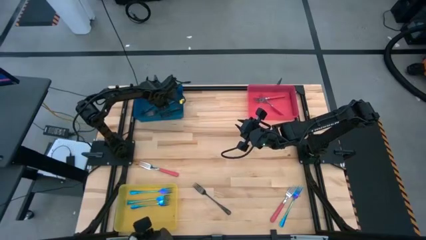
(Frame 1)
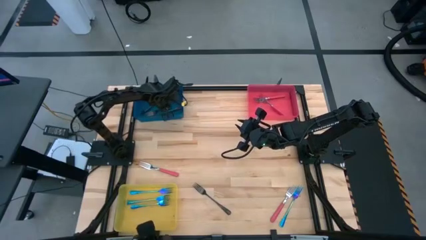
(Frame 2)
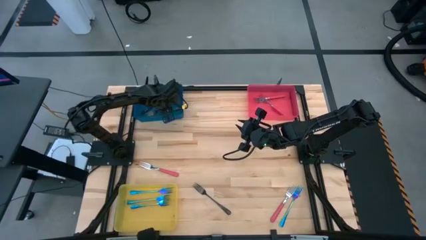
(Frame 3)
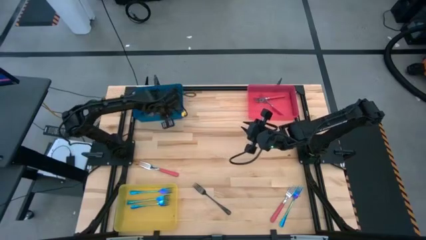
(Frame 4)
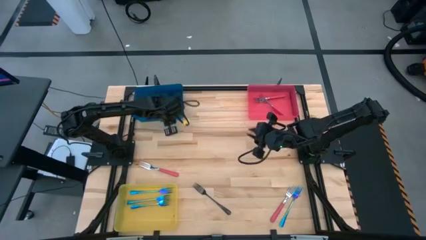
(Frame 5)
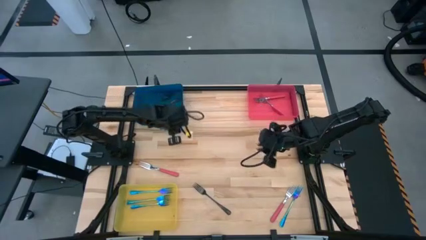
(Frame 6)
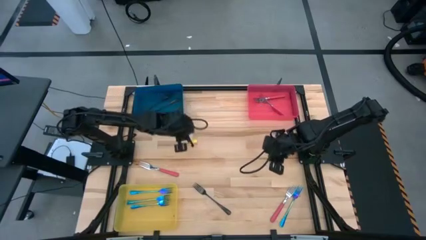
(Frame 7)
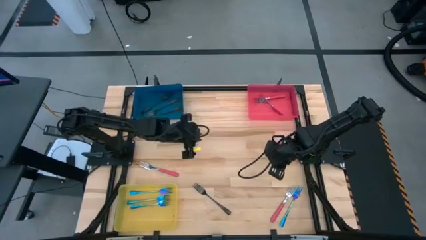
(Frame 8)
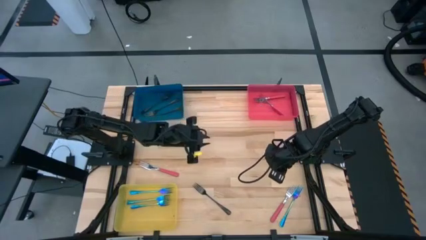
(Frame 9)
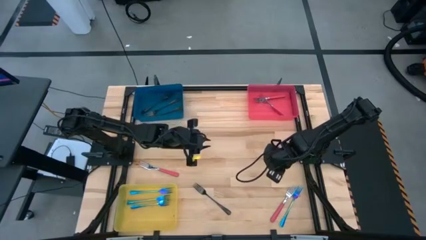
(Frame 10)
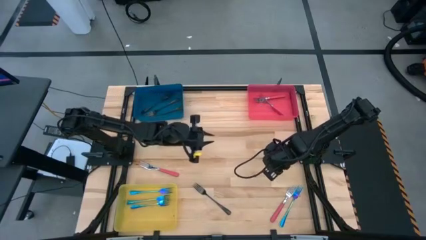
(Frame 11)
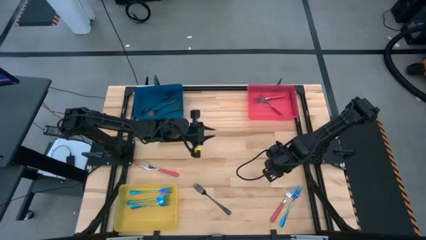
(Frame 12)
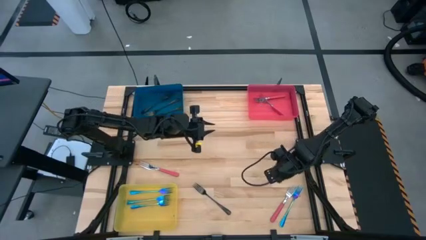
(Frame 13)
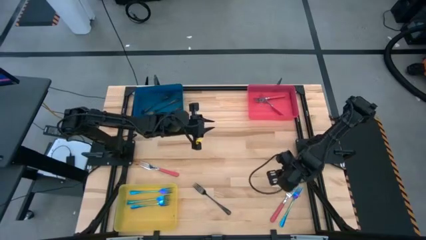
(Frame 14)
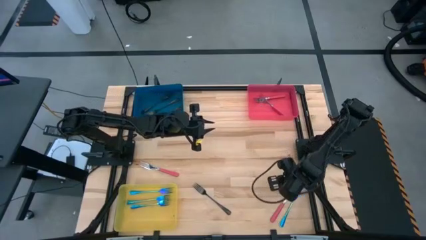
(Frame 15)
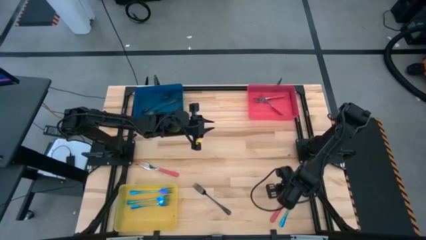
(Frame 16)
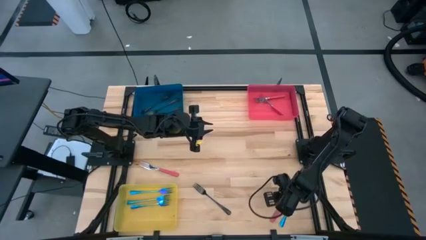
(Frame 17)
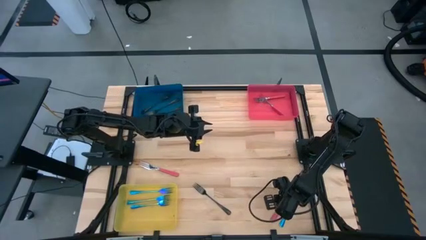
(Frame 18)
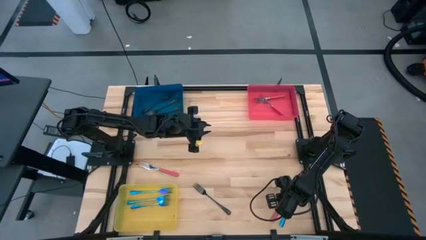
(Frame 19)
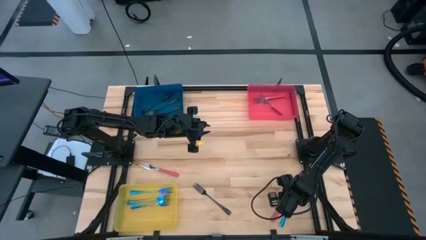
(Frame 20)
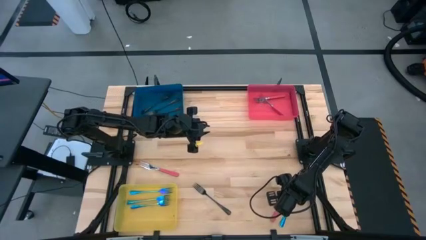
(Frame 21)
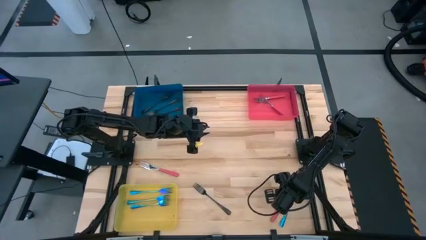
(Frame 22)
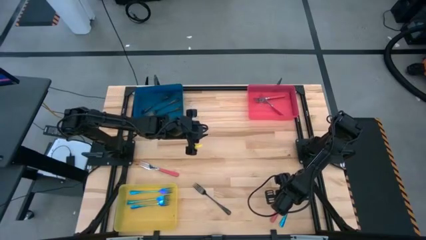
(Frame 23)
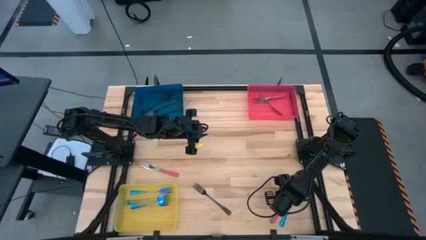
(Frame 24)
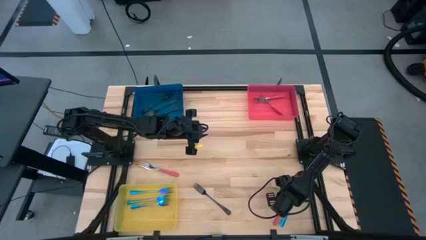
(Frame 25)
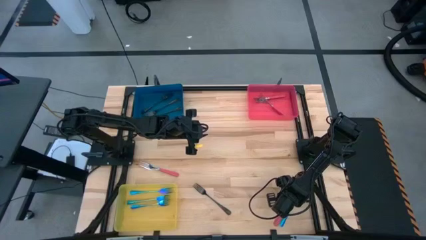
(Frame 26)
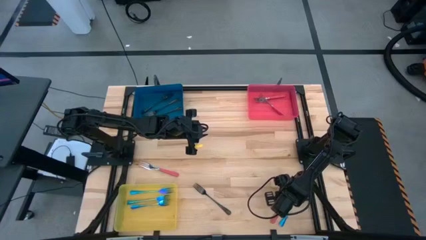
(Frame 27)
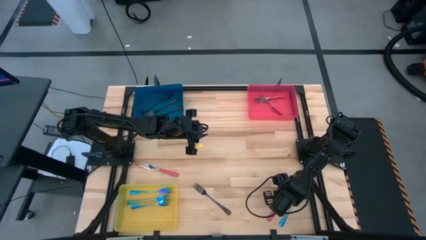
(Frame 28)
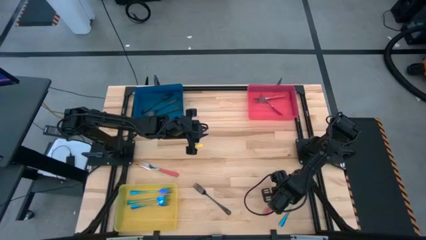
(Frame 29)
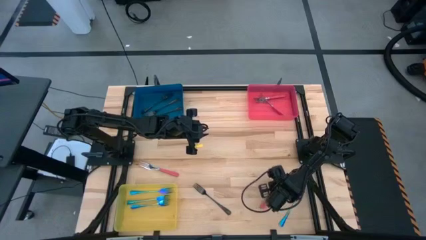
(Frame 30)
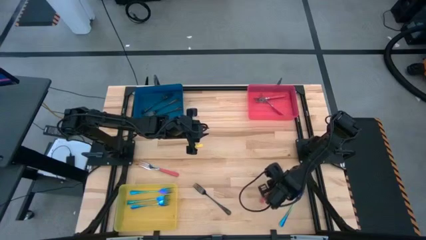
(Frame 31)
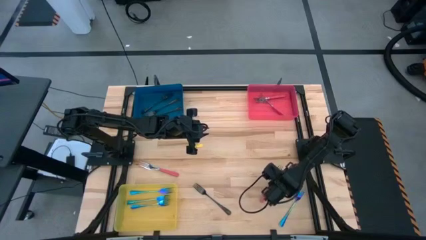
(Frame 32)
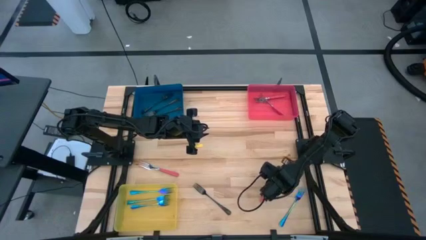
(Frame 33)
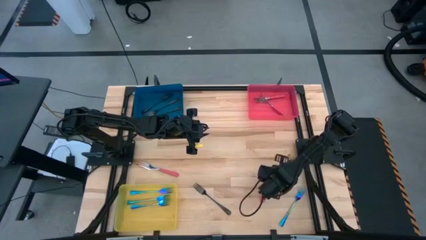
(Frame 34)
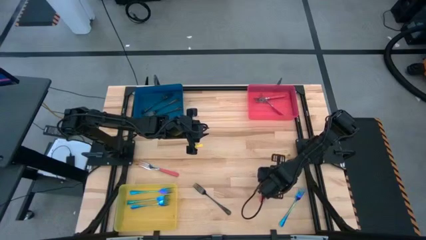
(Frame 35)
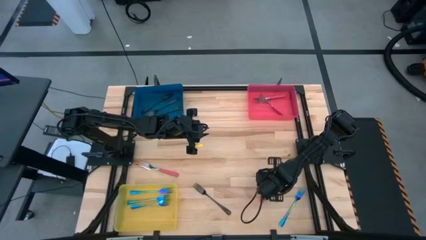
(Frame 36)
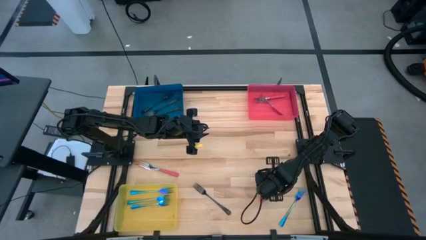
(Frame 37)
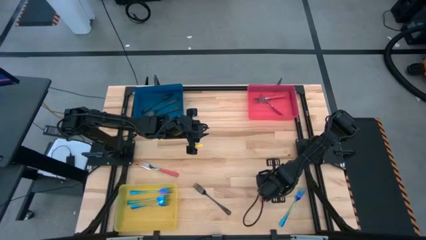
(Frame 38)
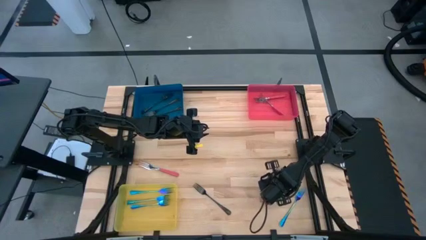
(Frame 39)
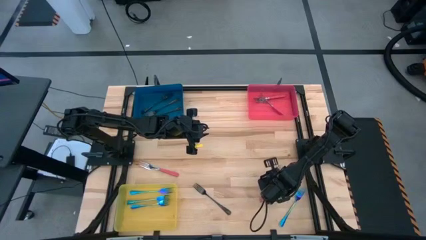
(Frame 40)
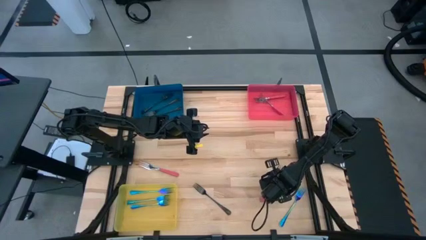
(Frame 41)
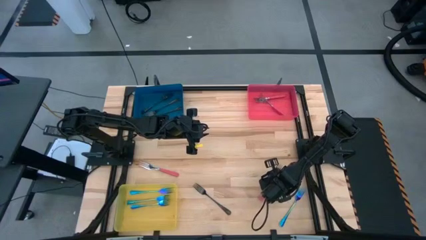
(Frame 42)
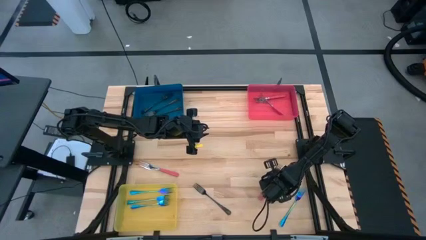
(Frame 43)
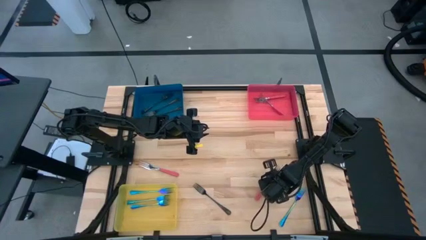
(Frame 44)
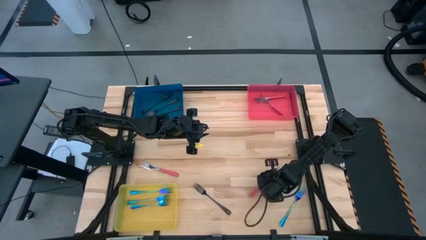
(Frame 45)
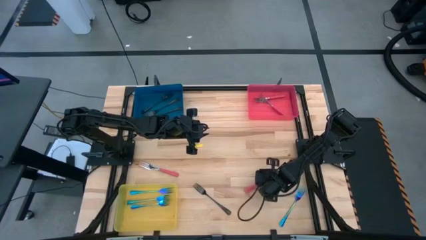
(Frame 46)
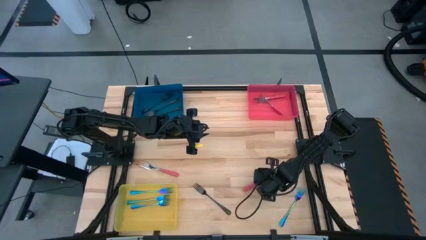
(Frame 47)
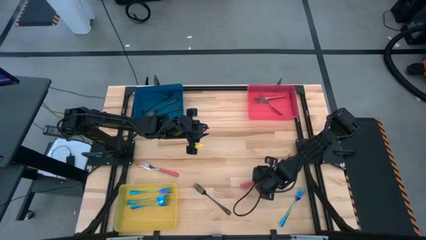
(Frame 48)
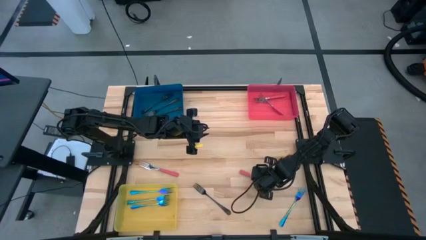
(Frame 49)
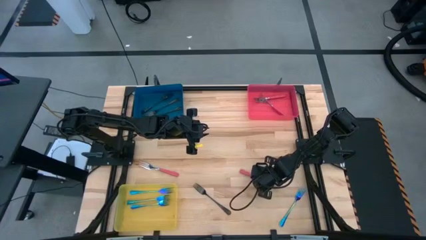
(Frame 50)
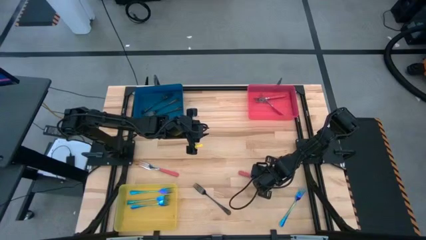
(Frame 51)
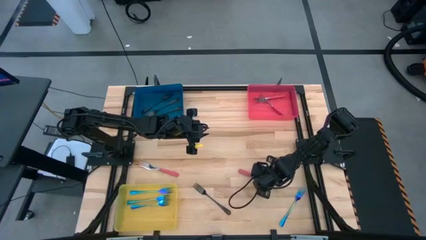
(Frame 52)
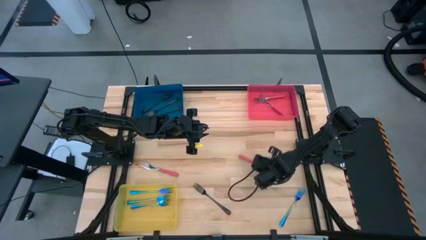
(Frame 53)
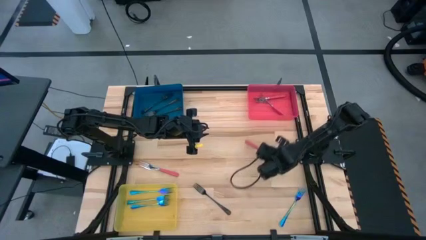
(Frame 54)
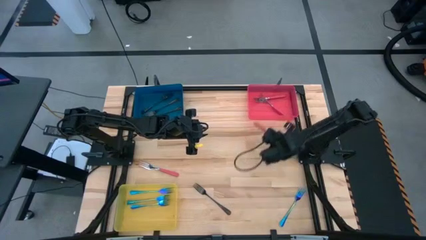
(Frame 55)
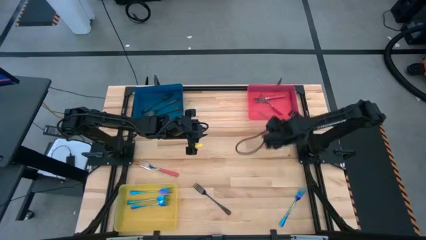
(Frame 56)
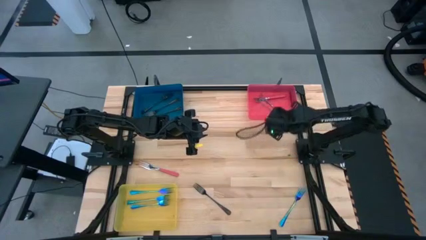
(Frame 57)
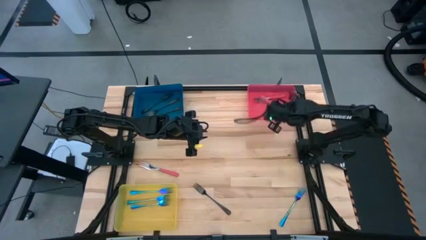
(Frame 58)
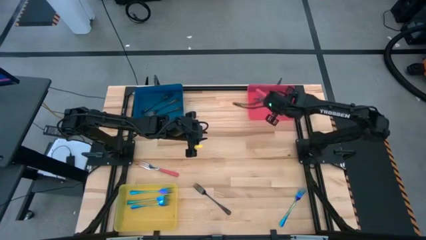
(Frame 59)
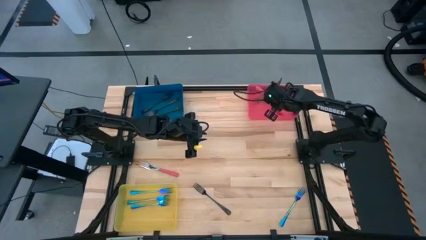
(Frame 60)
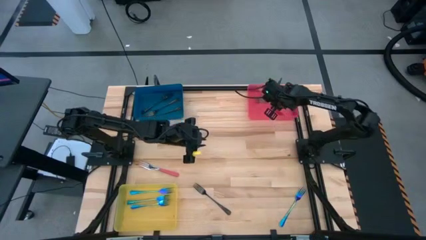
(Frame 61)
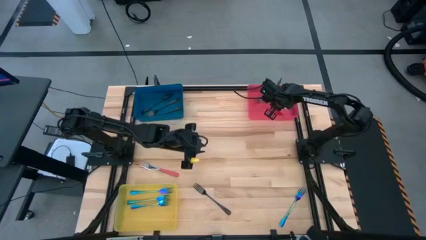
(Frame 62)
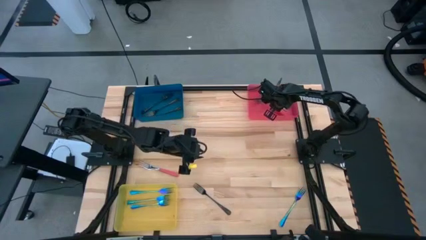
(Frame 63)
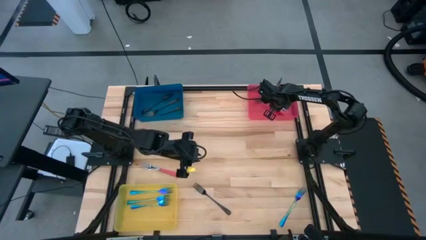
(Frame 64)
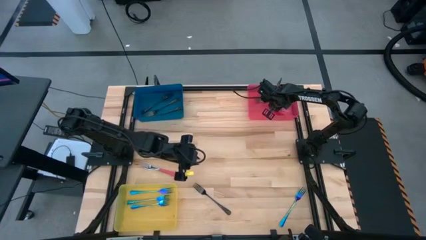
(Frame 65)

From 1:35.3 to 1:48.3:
Task: Sort silverware by color (type)
Put the right pink fork into the pink bin

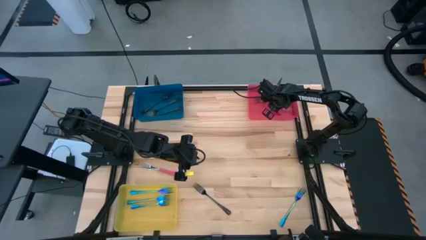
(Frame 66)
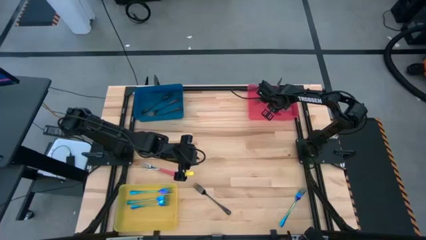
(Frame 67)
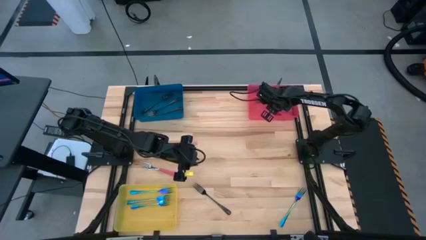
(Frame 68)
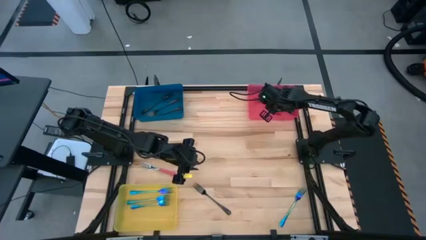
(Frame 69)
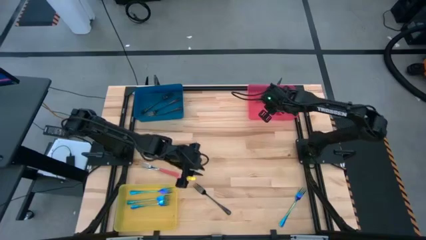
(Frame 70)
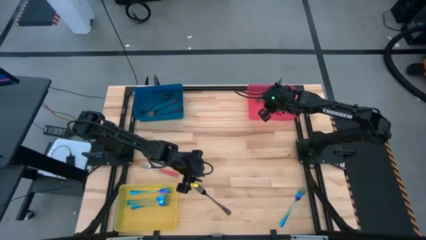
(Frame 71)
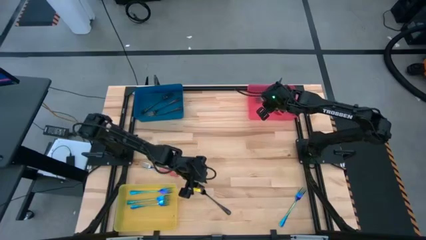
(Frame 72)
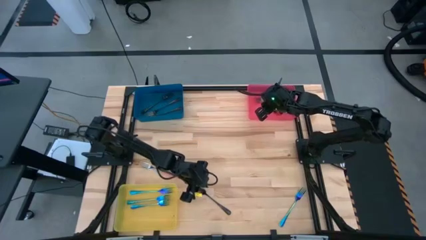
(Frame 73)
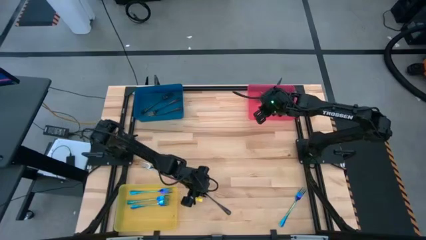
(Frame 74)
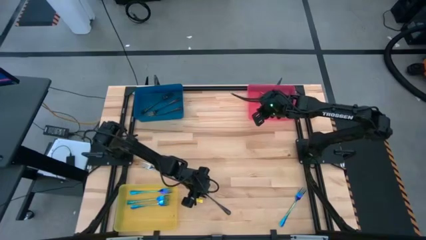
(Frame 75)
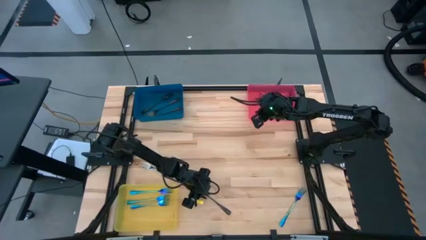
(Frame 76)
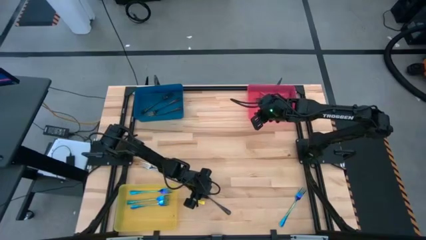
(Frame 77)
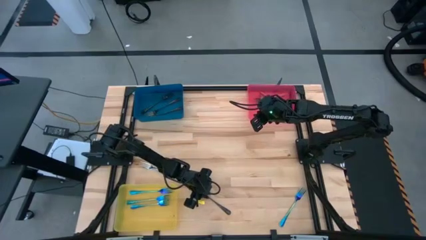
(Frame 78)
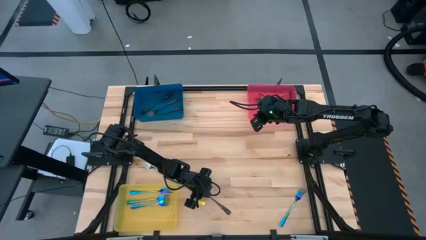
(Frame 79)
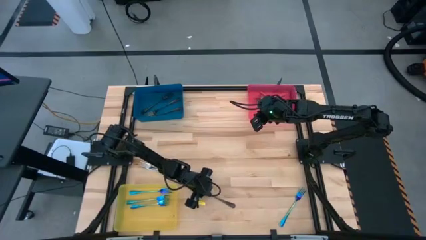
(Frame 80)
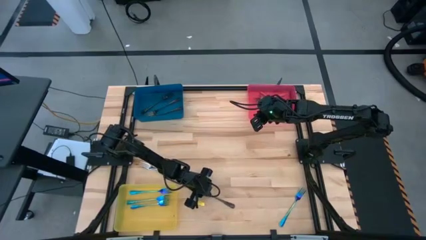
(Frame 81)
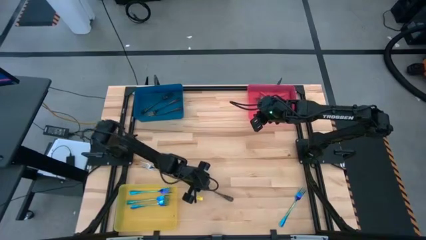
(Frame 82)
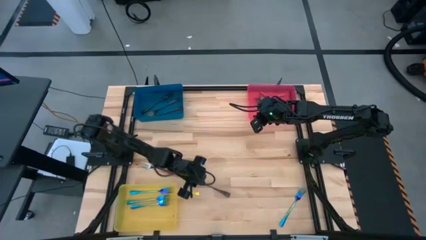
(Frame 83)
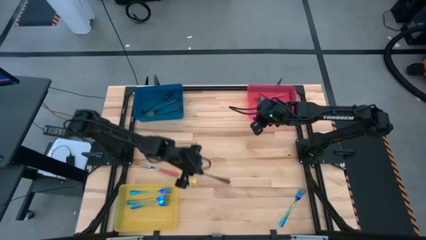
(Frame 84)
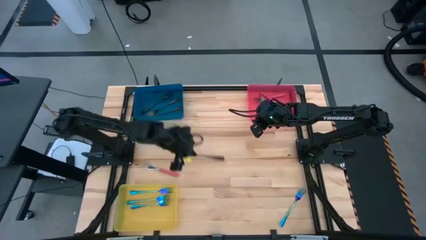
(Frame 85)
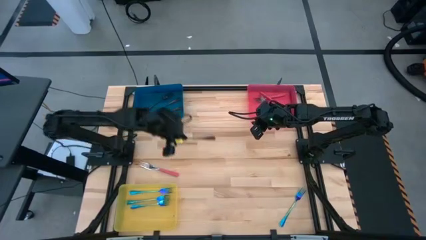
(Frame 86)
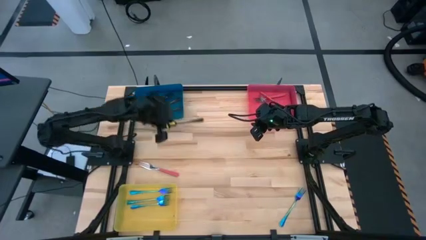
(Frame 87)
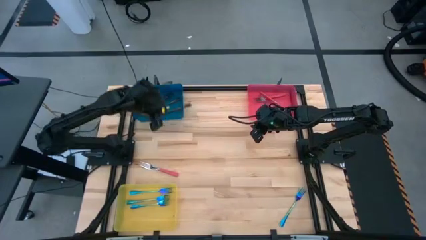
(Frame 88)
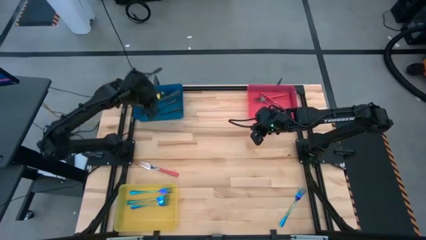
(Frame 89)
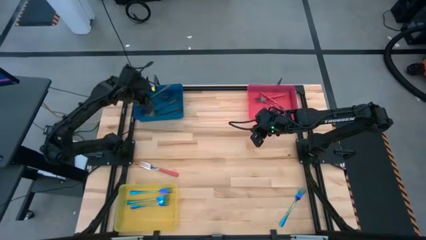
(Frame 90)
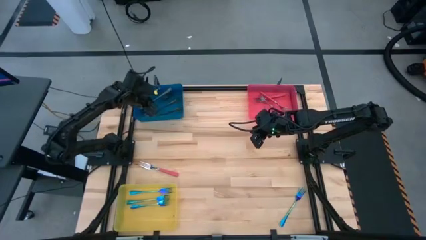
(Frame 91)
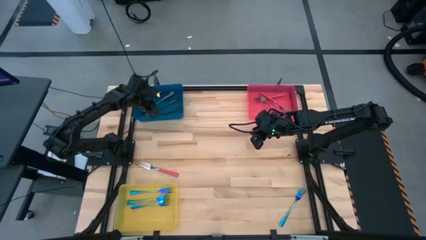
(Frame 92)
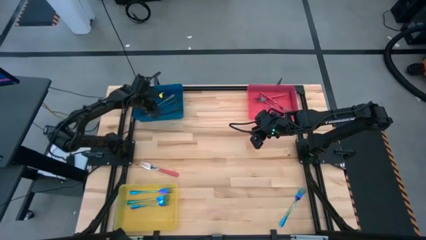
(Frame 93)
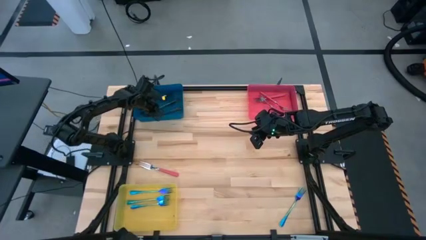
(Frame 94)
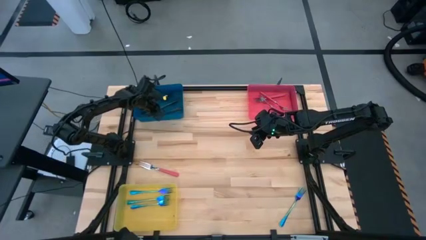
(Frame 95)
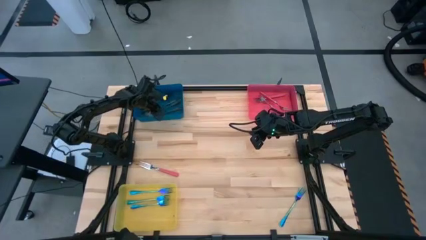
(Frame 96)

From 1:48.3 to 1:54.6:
Put the black fork into the blue bin
